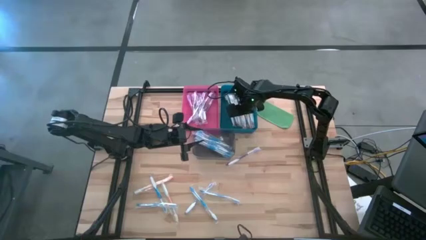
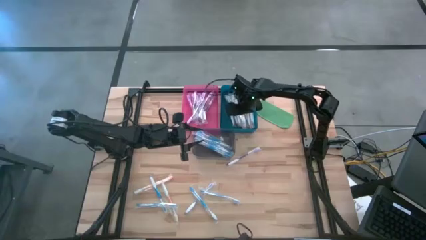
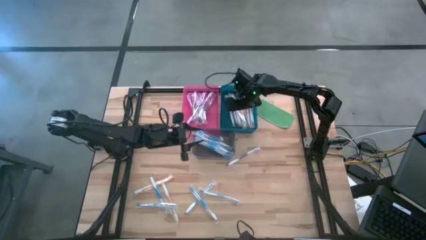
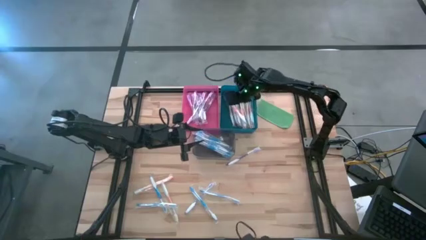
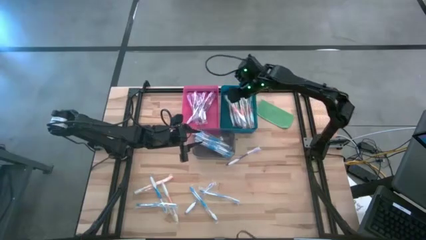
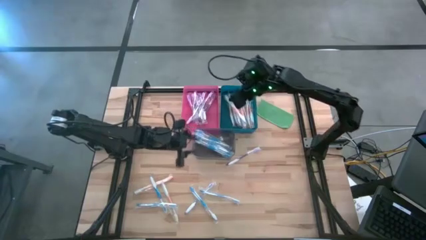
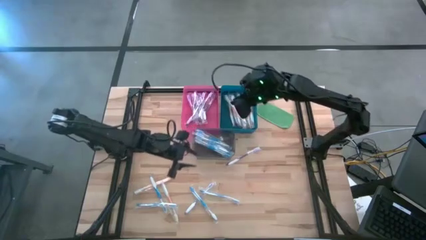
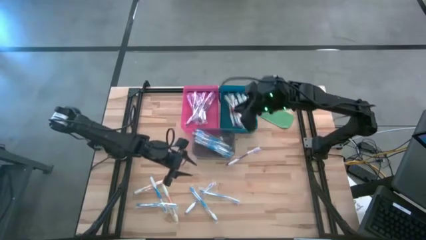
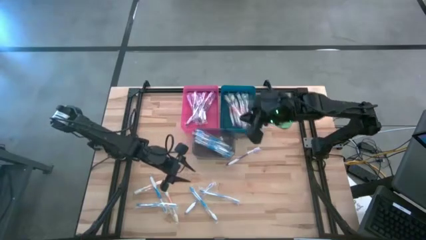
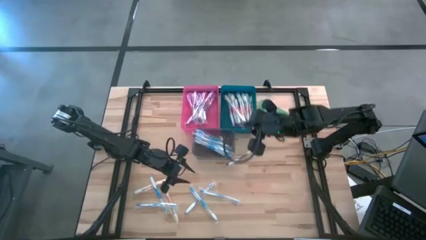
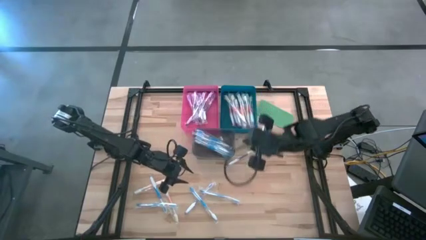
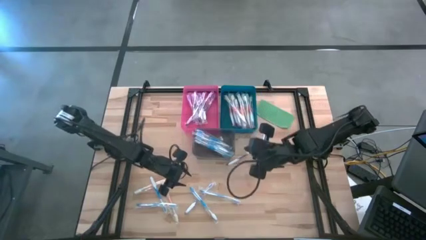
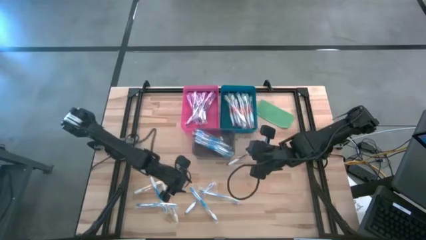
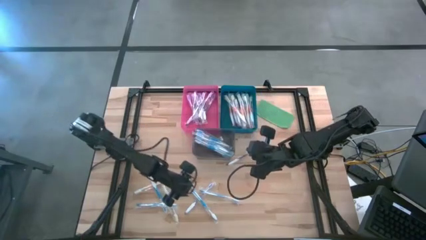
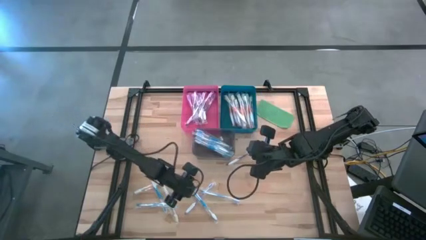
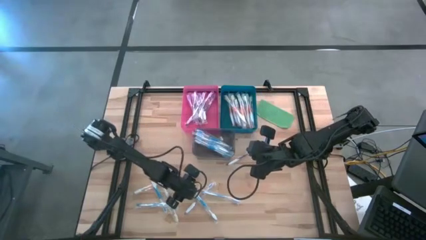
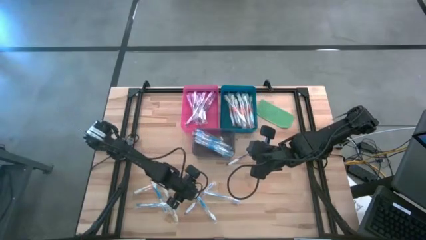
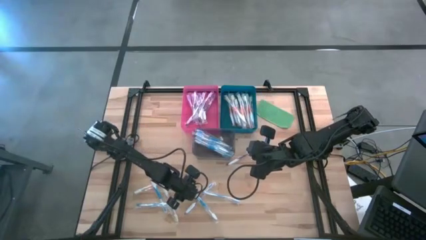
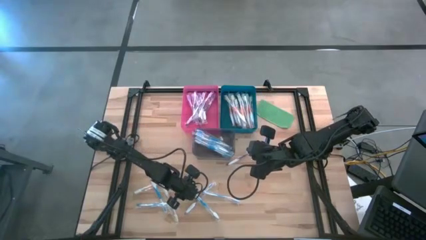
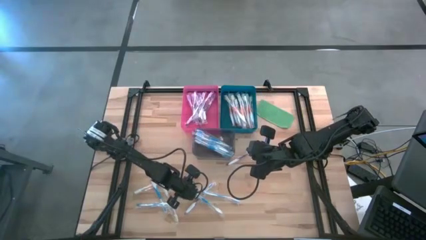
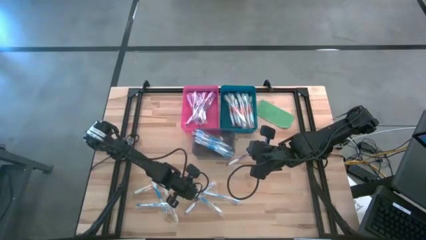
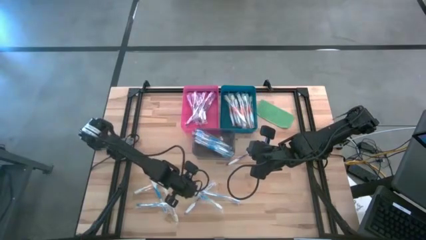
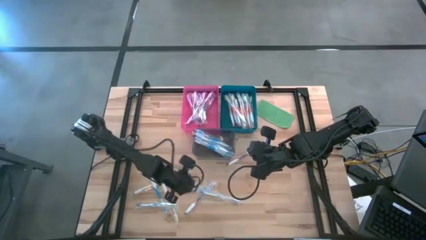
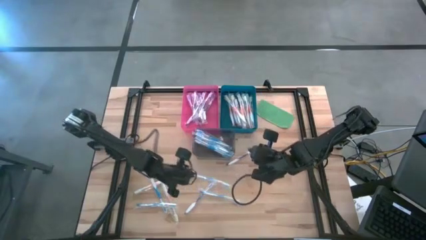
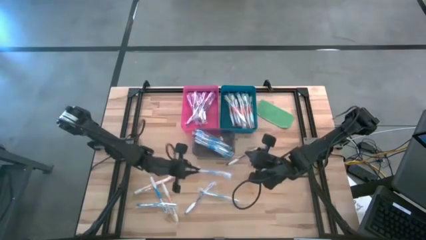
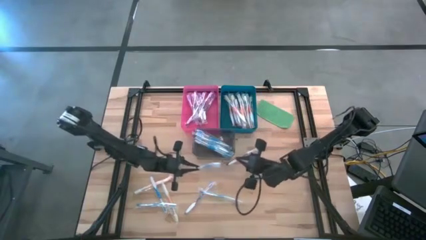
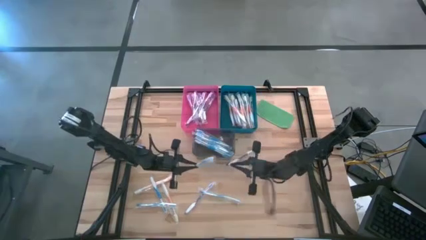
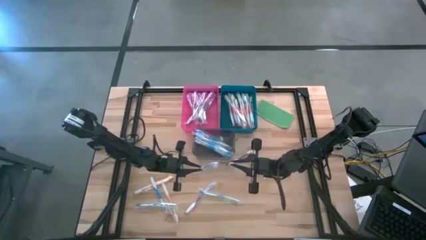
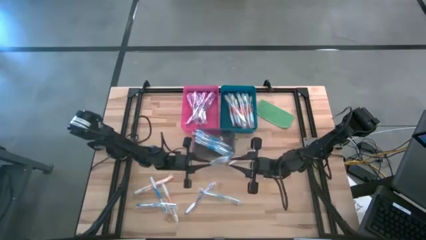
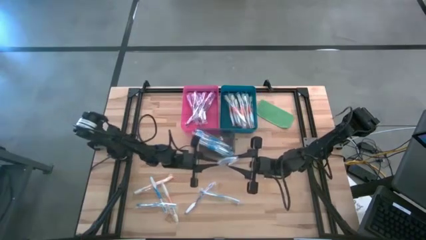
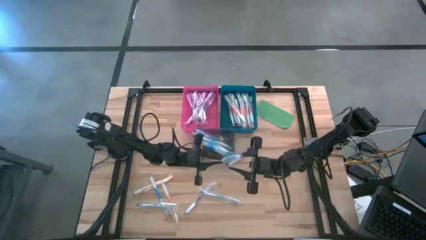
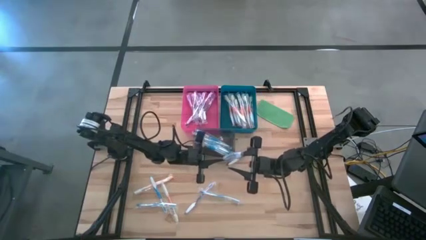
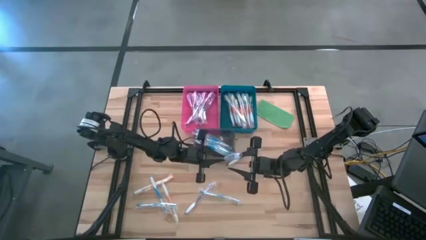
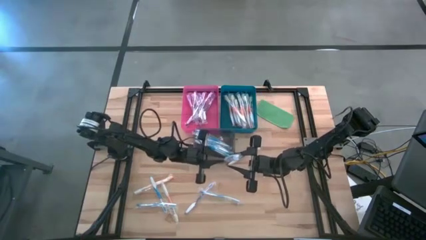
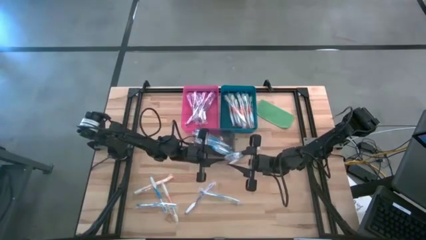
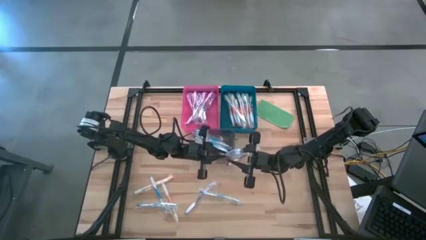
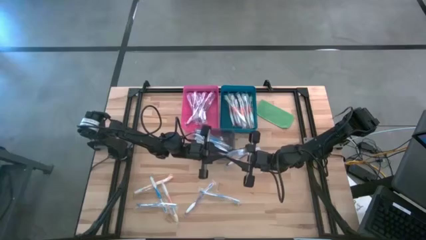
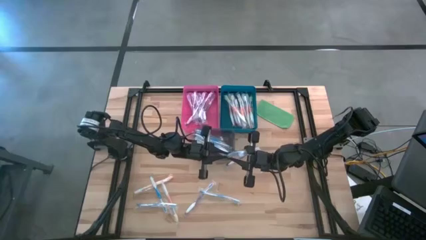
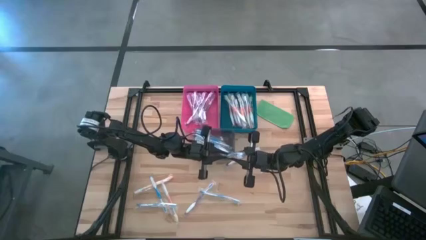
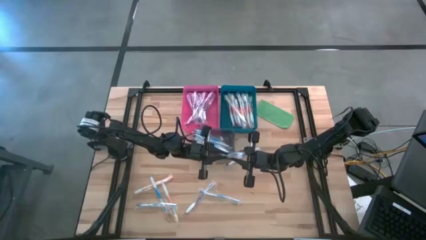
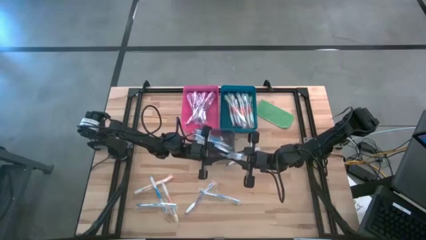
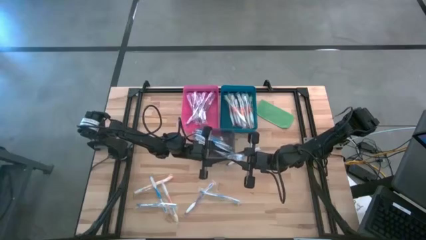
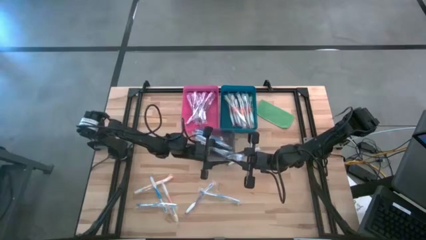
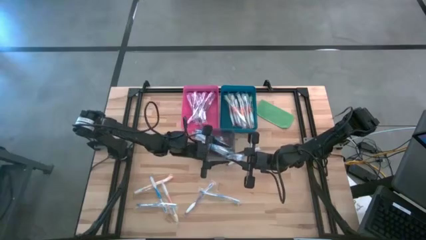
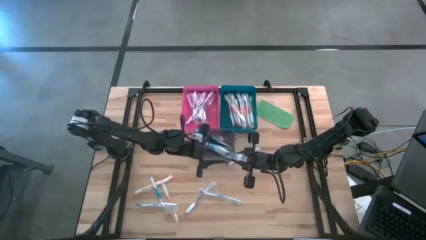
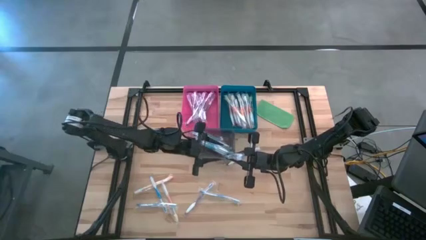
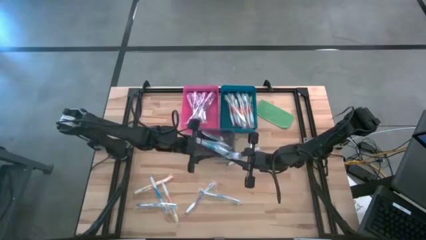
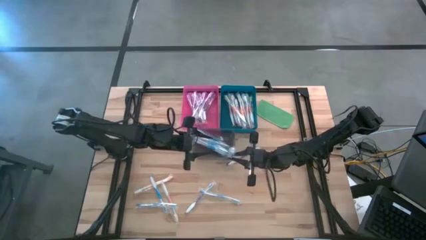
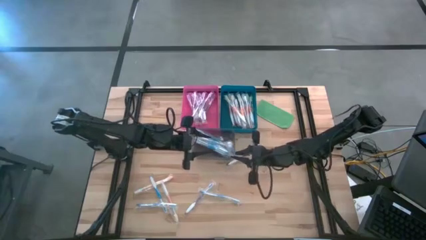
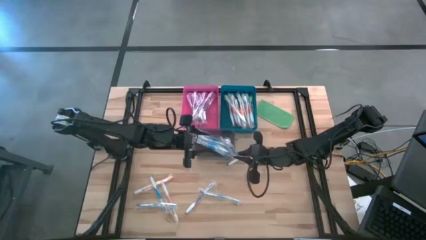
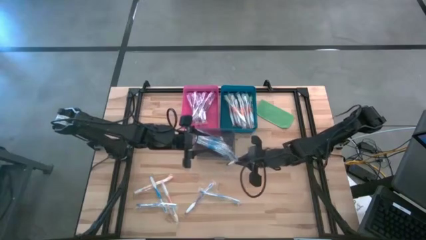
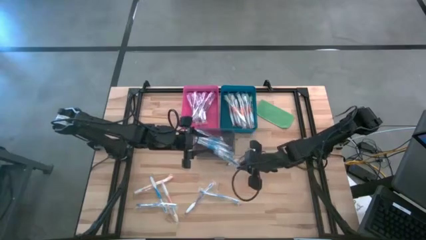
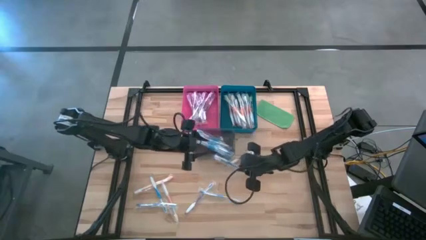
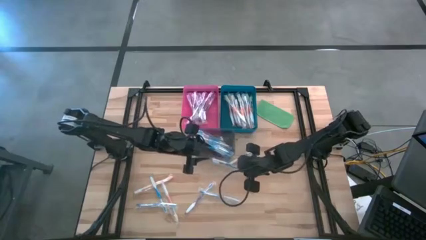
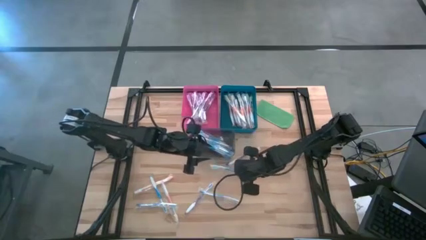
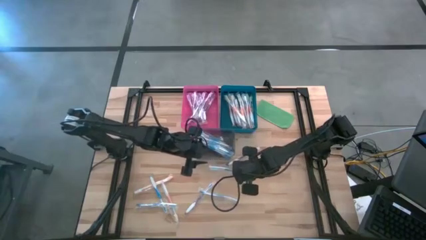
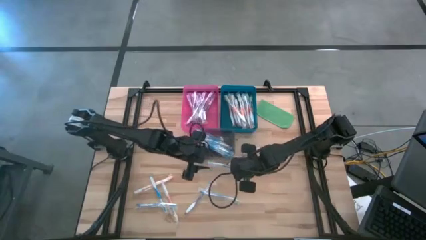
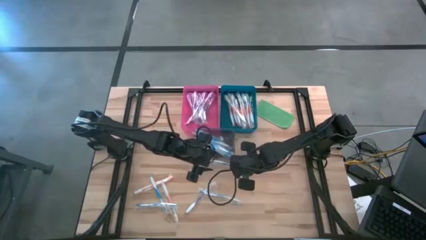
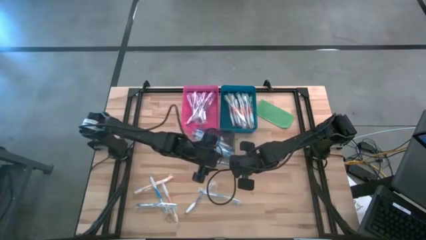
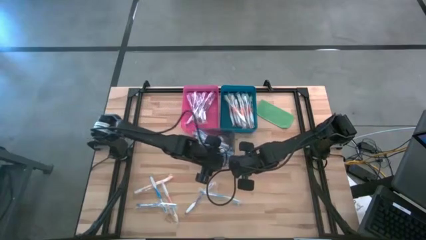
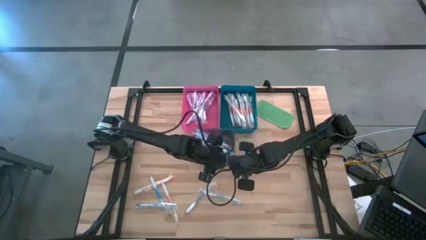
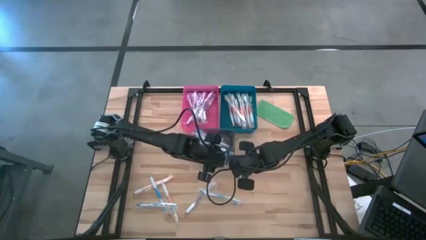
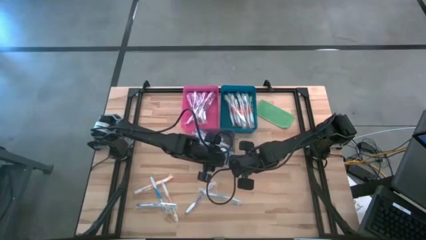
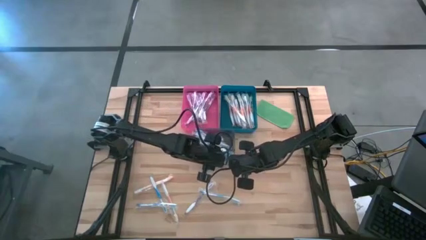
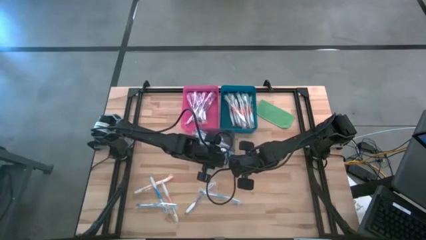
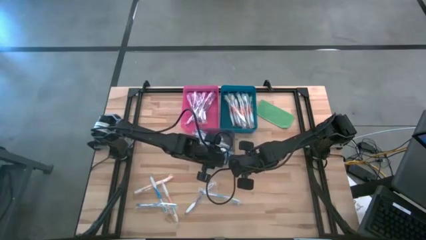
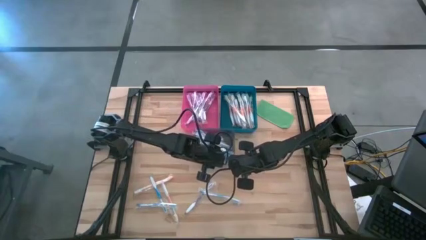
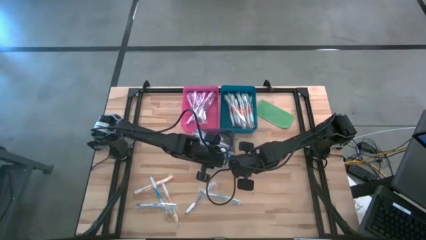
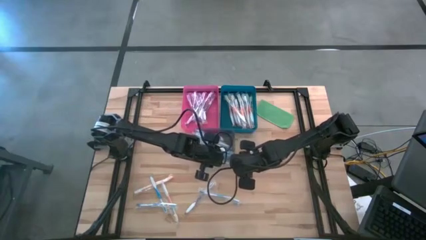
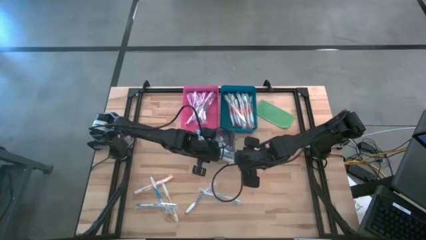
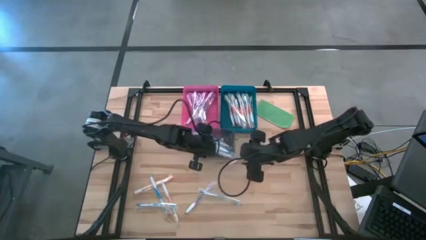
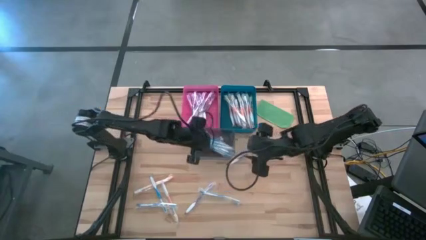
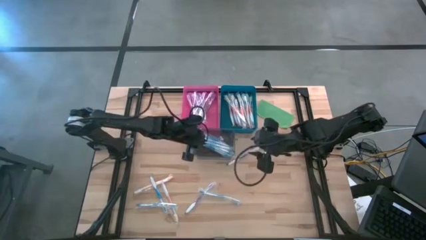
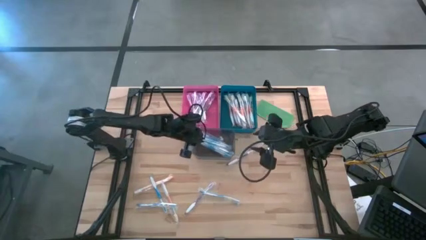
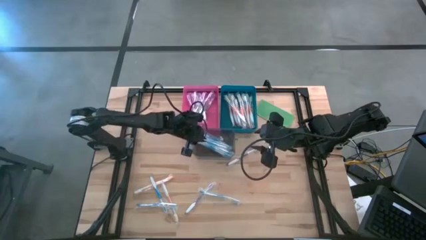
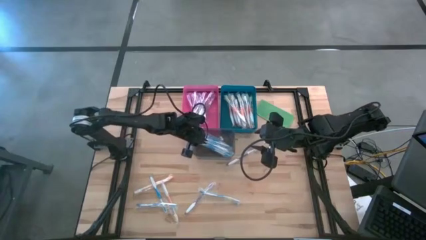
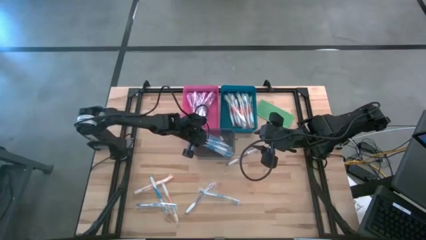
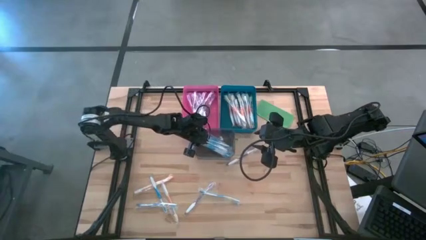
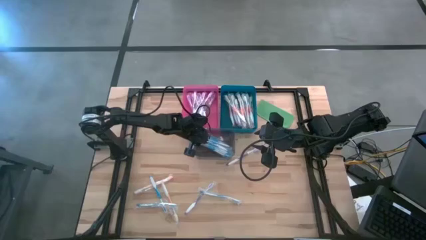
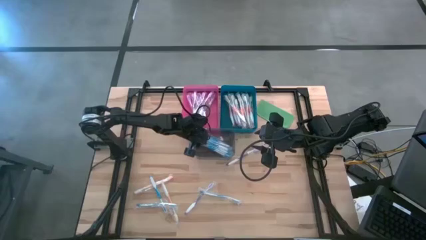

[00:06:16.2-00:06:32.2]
Task: Pick & Place Toothbrushes
Put the blue toothbrush into the transparent gray bin

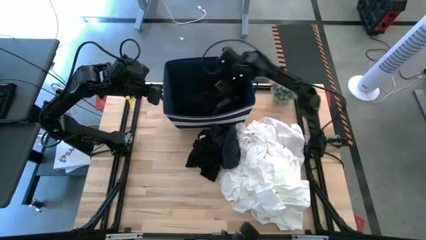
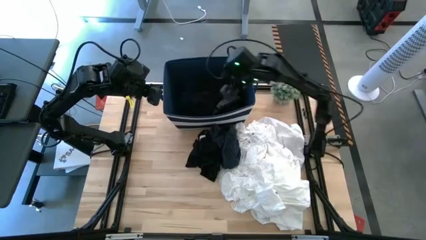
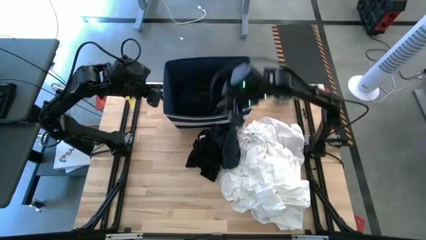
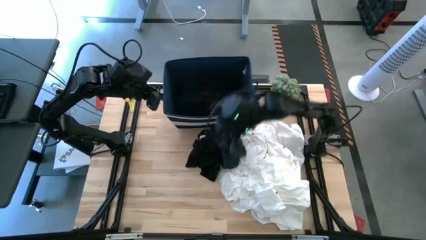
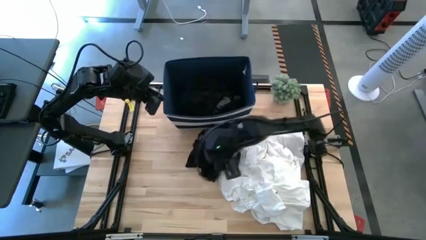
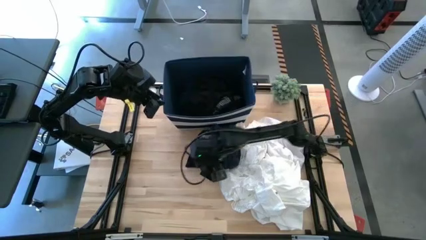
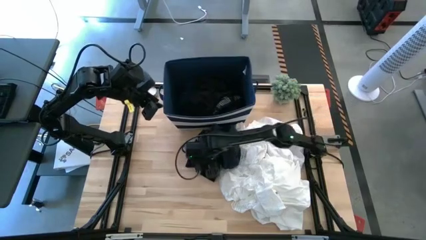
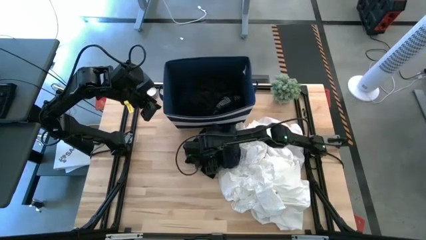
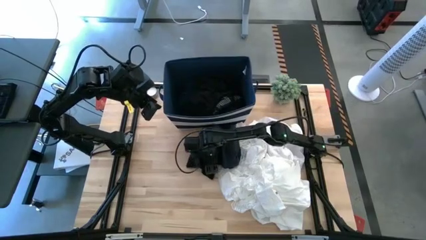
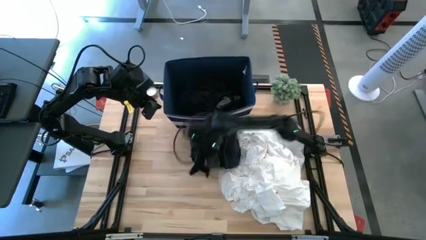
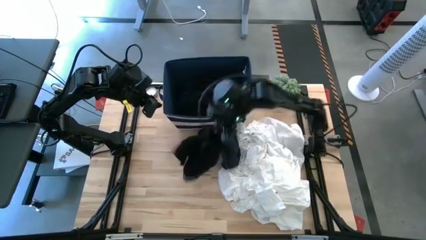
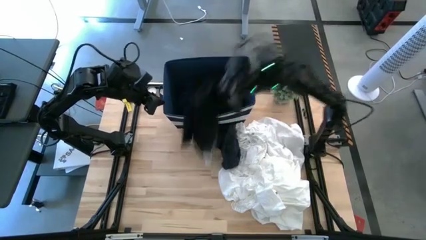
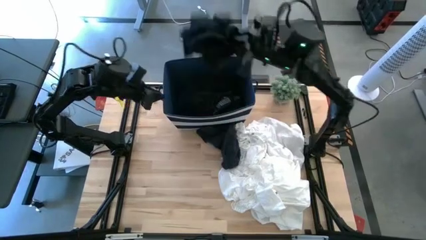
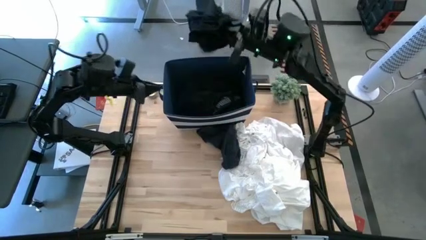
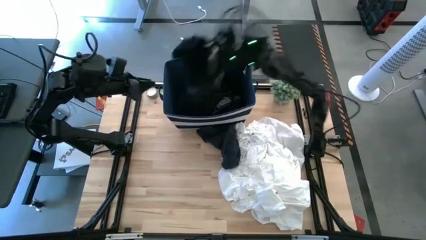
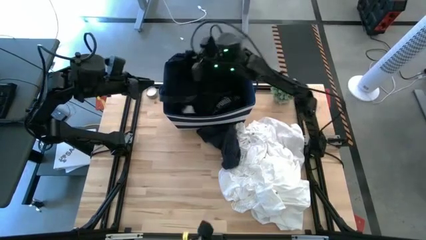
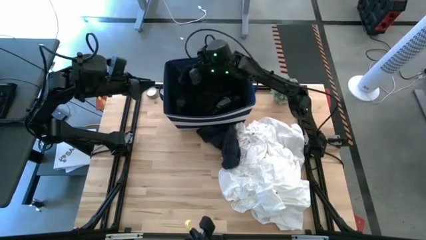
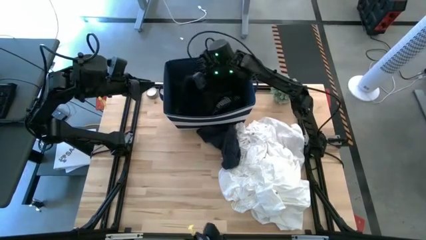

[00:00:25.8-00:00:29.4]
Task: Sort clothes
Put the black underwear into the blue bin
